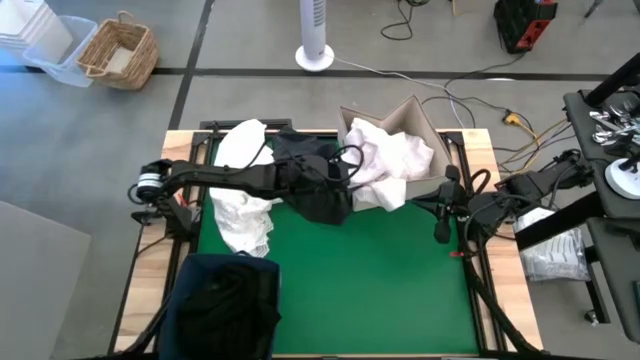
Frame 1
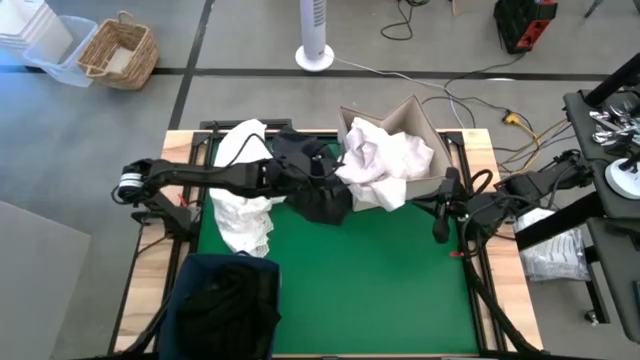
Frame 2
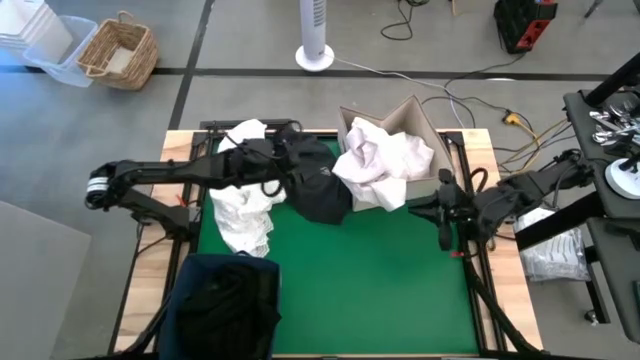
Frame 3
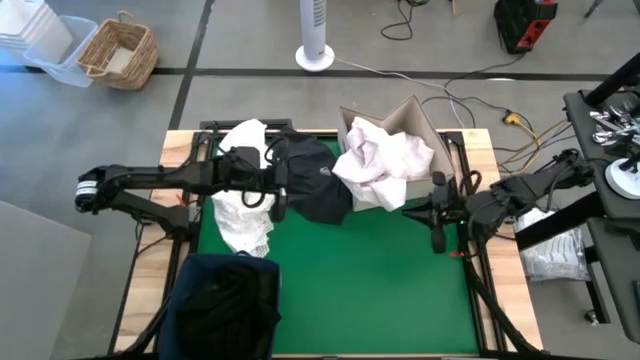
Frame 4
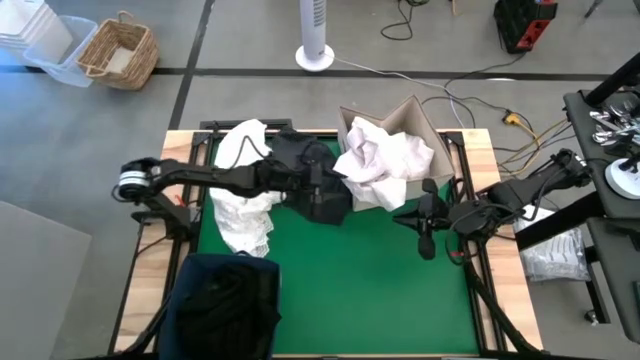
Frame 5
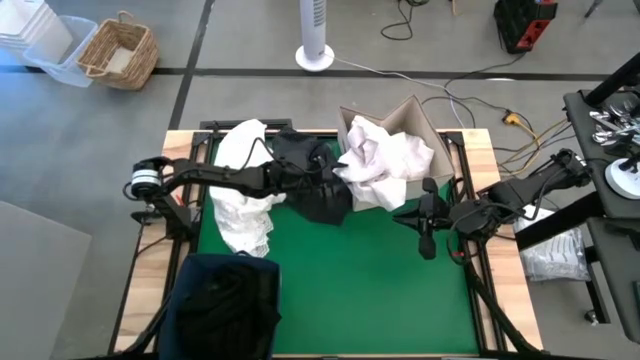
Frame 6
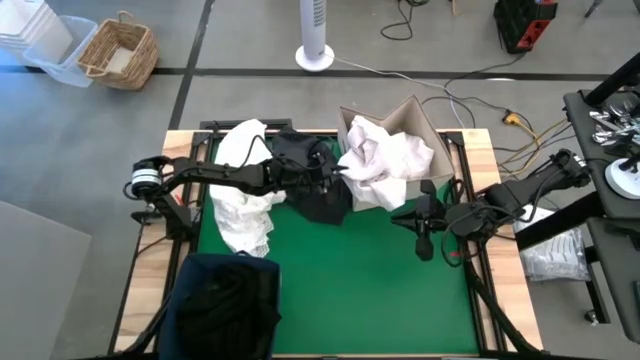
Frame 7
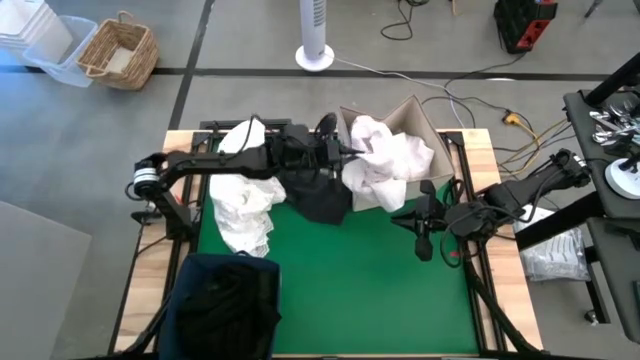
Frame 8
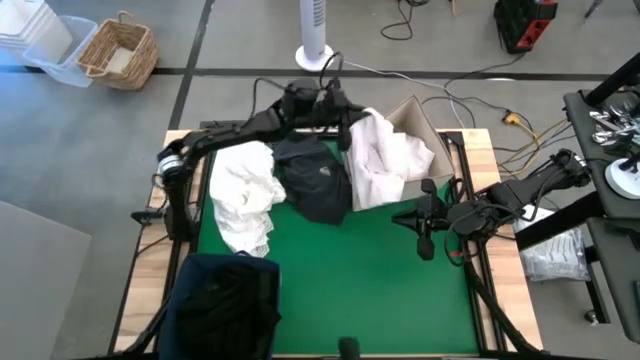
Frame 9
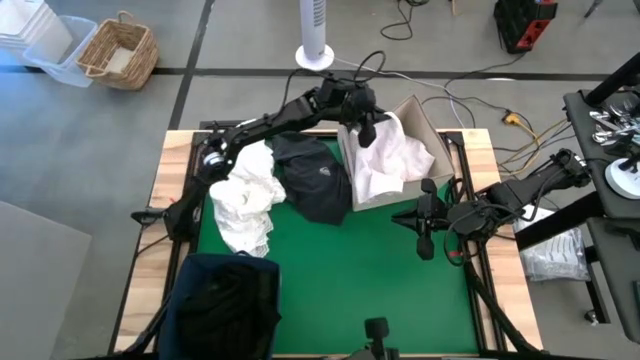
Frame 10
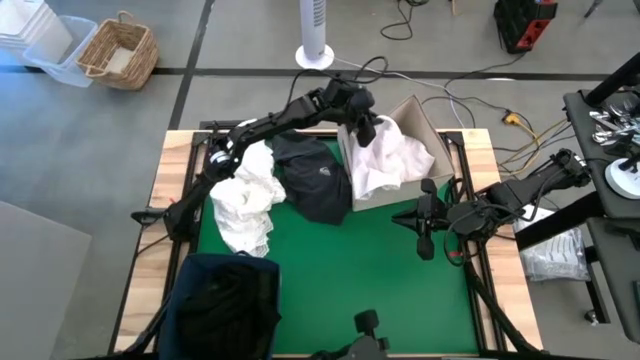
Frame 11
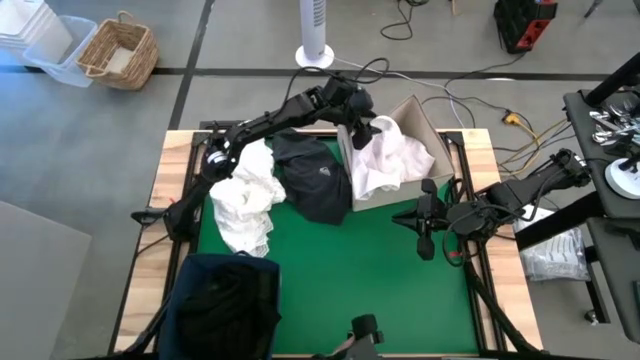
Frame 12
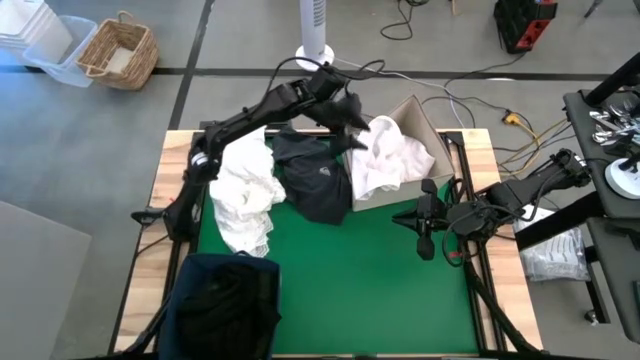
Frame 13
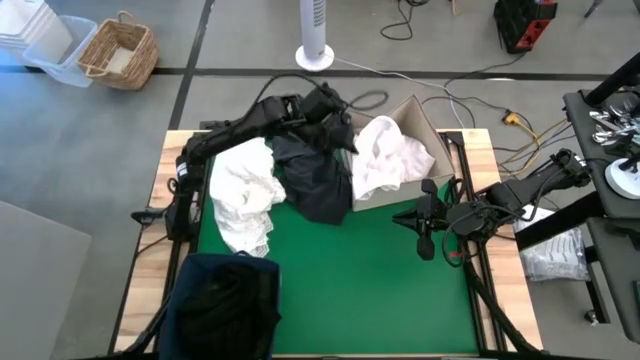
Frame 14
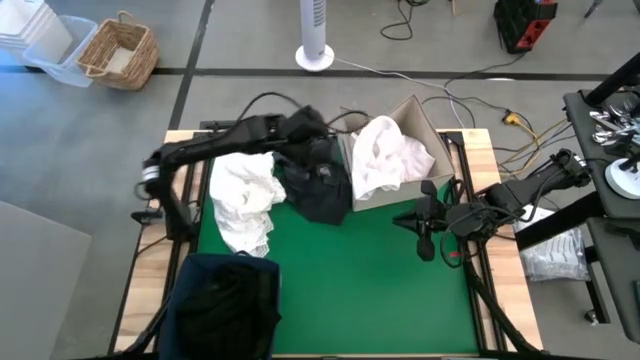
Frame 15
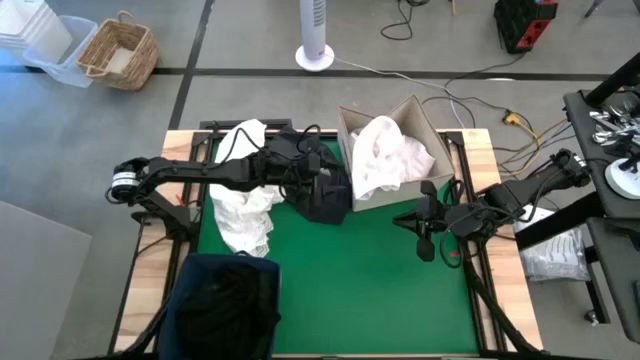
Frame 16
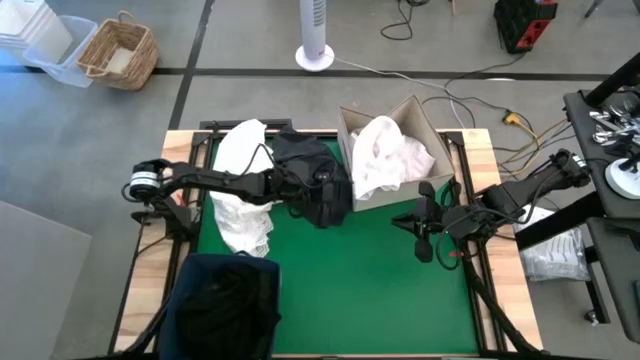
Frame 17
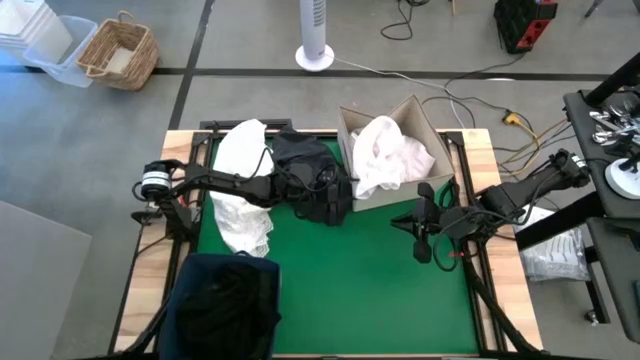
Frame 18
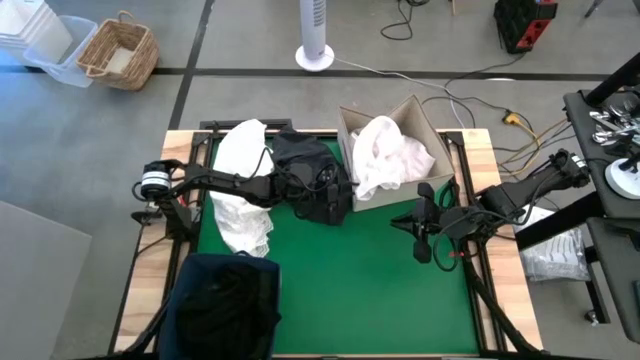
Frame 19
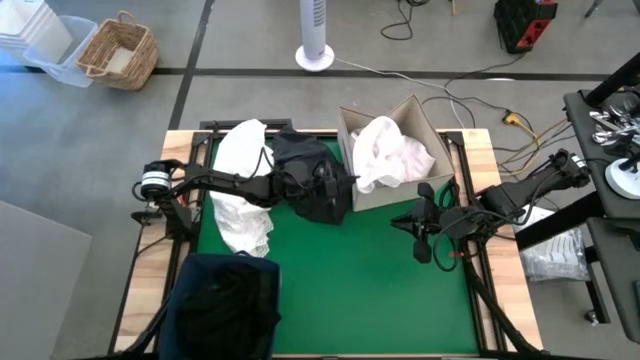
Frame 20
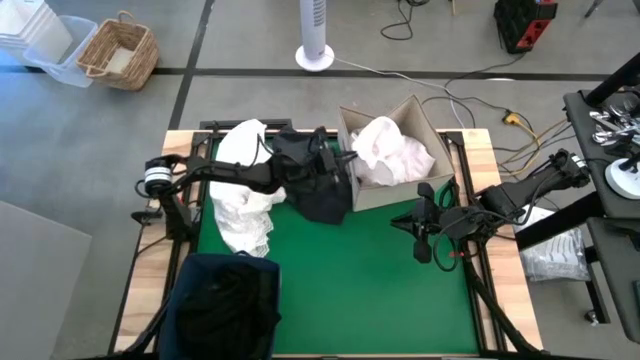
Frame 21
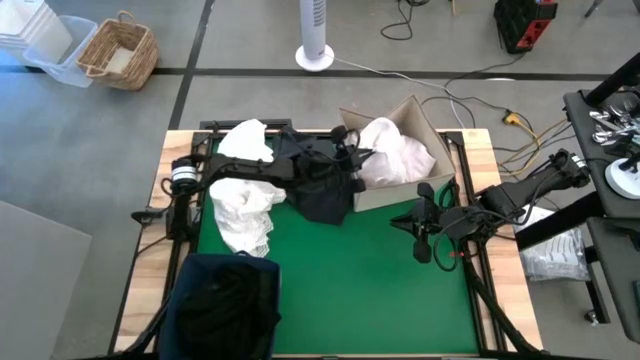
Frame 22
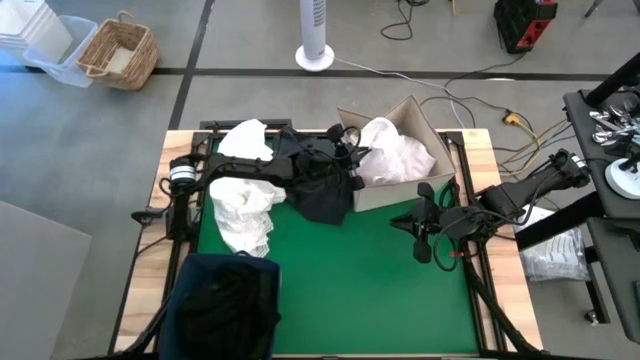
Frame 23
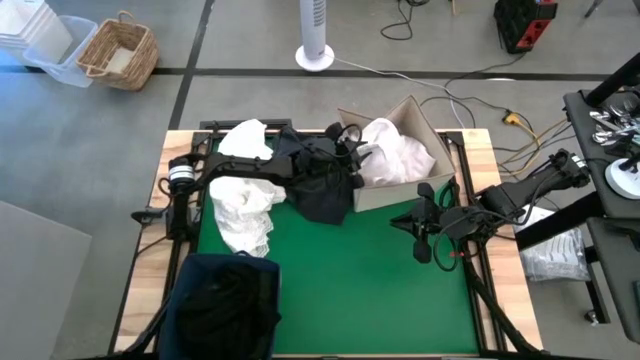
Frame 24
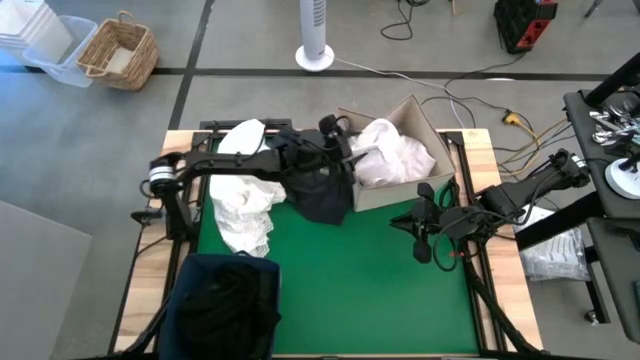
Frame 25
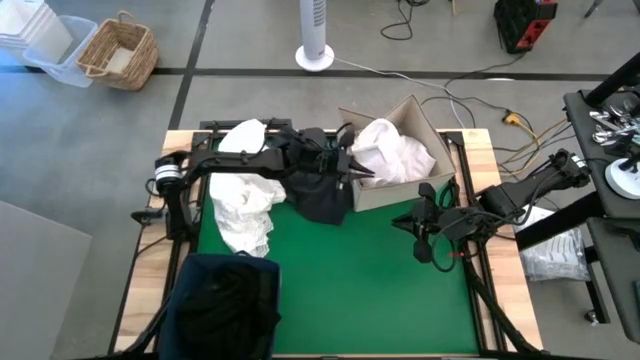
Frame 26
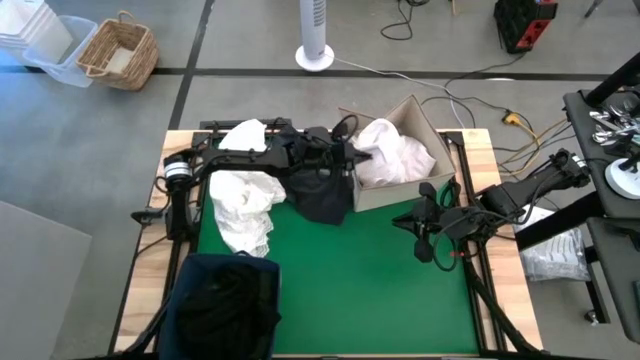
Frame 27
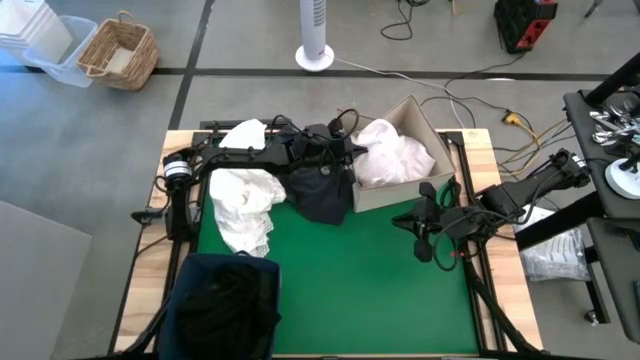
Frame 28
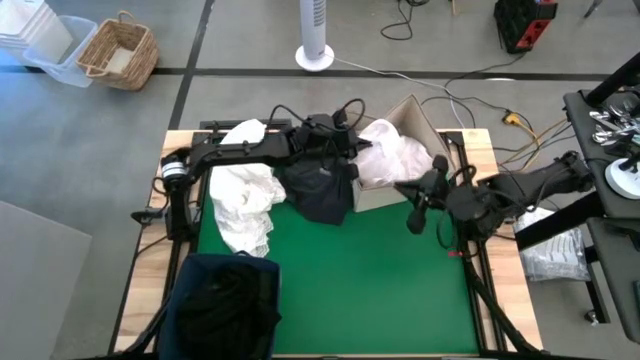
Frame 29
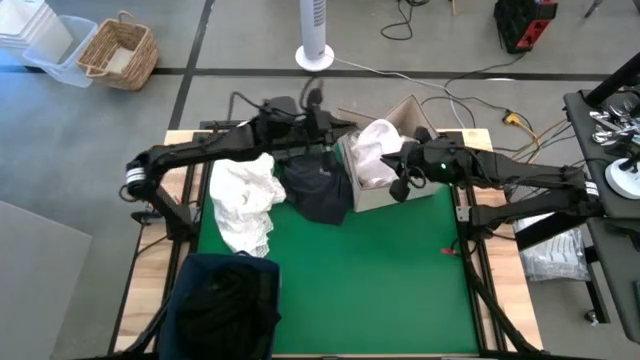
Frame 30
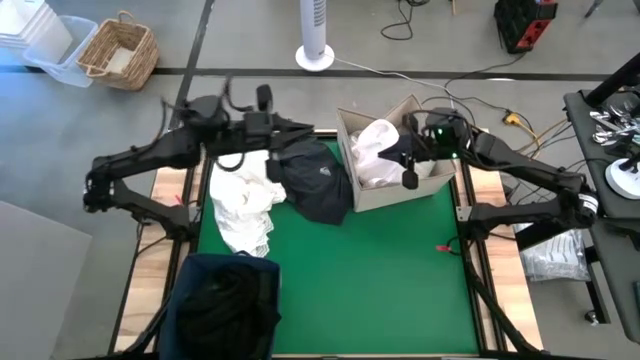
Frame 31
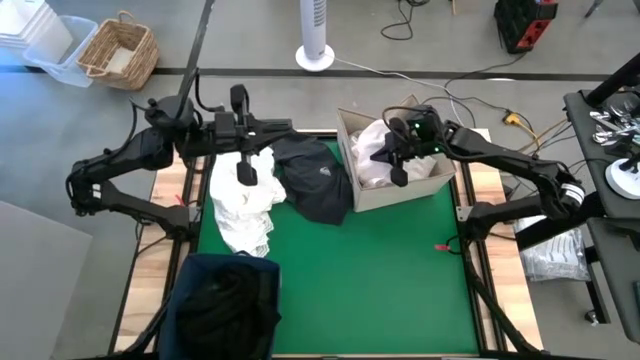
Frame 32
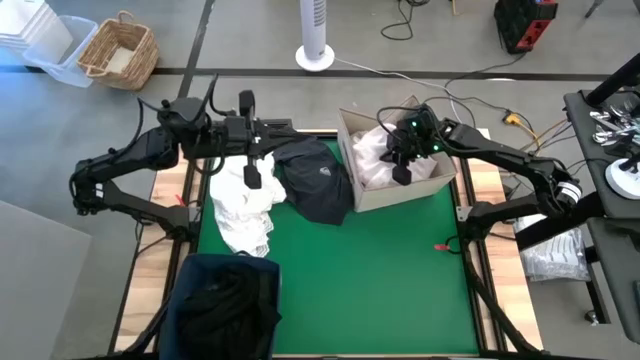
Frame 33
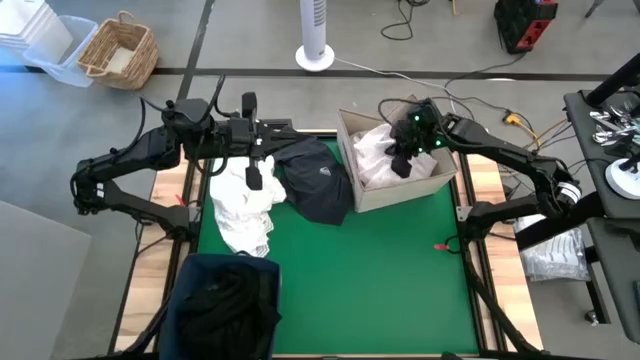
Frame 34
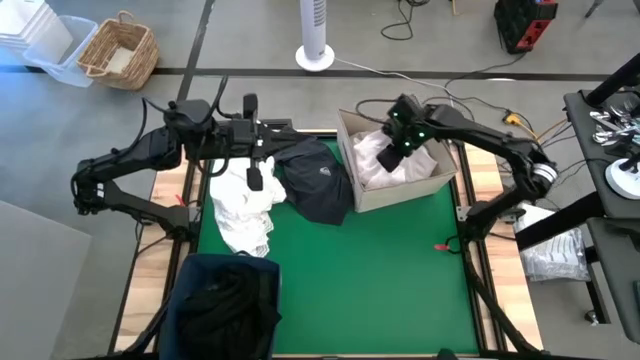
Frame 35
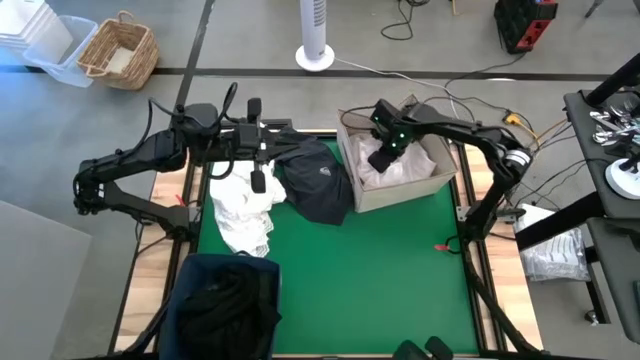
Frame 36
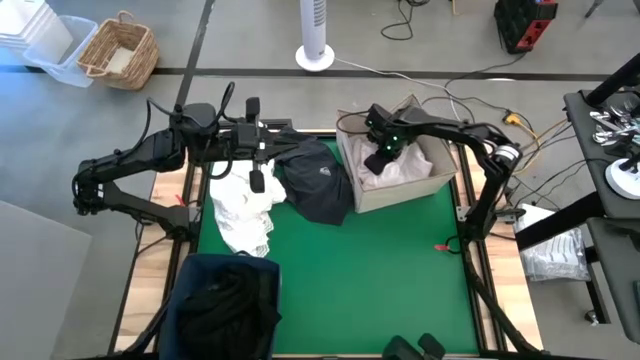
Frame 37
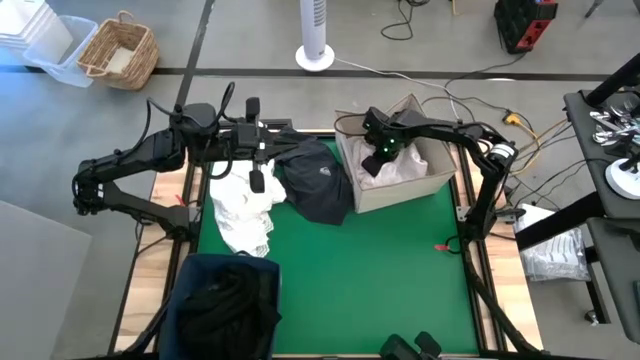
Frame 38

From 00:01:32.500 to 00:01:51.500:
Put the bottom white shirt into the brown laundry organizer
